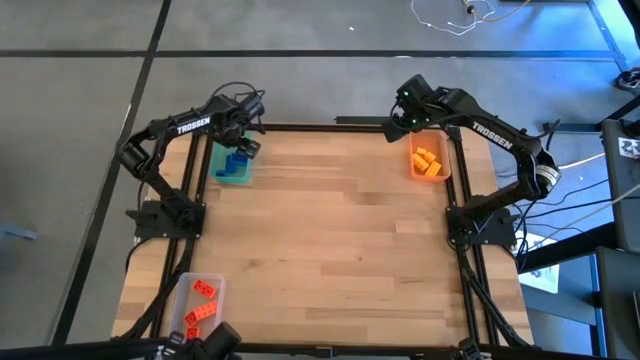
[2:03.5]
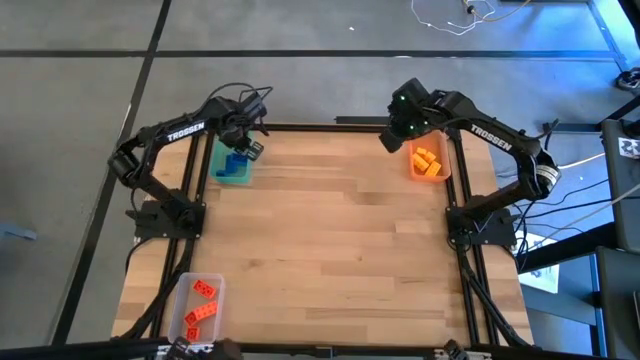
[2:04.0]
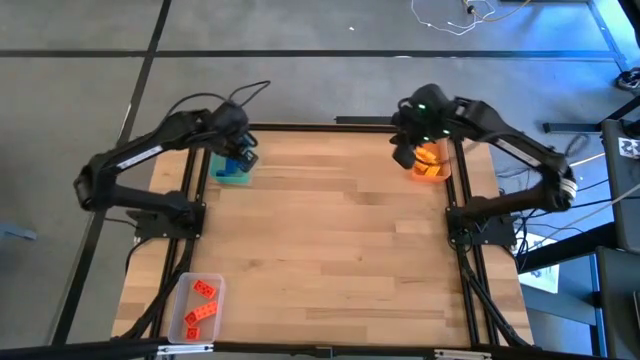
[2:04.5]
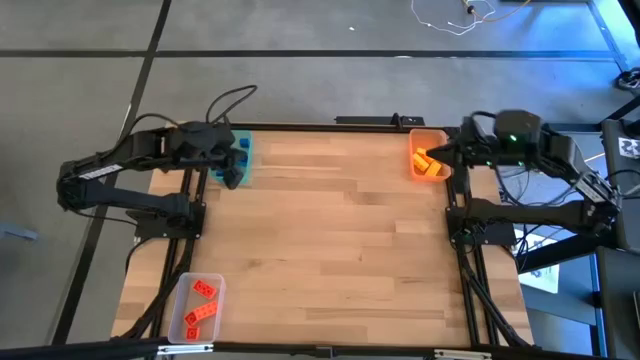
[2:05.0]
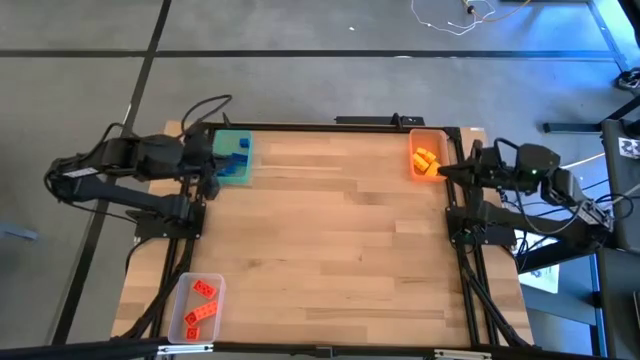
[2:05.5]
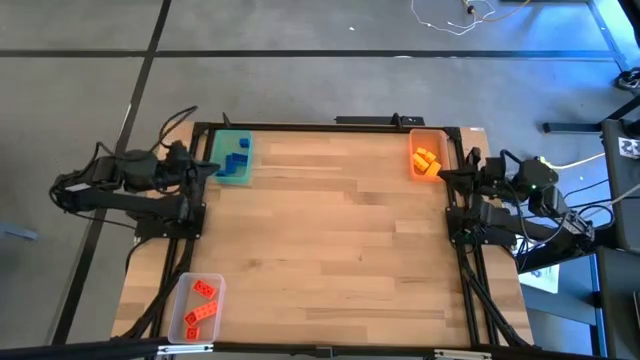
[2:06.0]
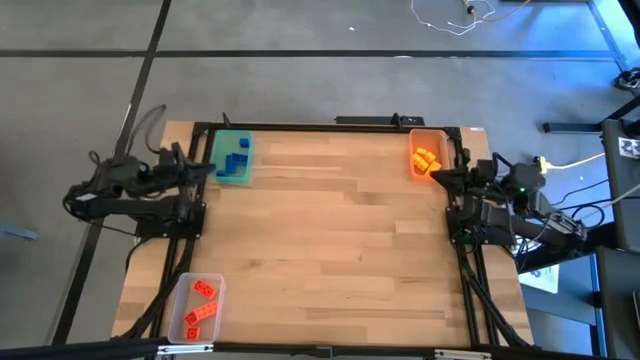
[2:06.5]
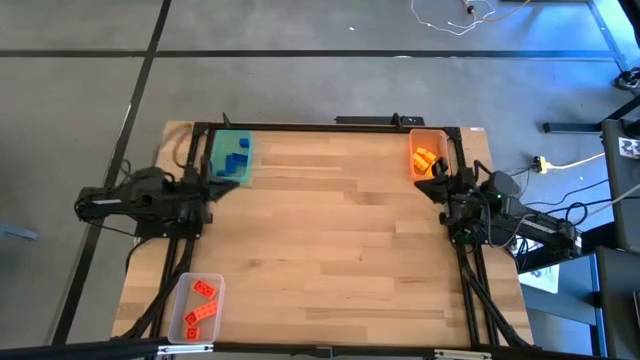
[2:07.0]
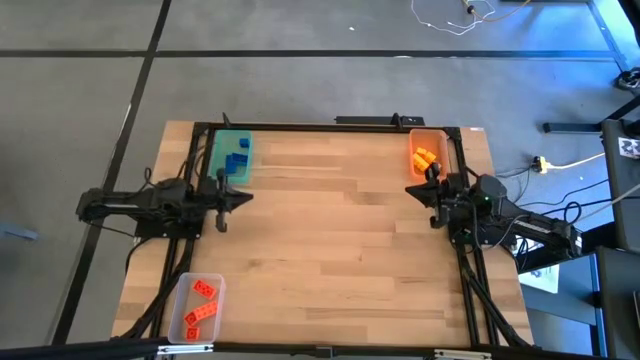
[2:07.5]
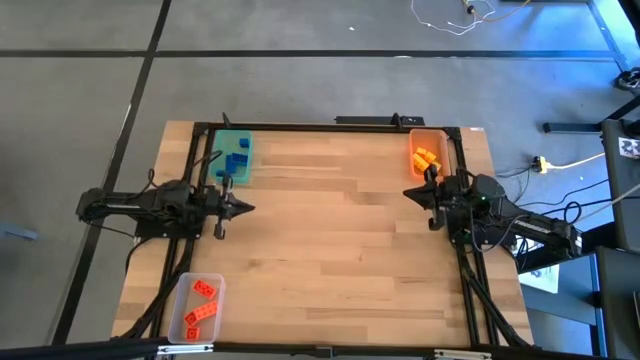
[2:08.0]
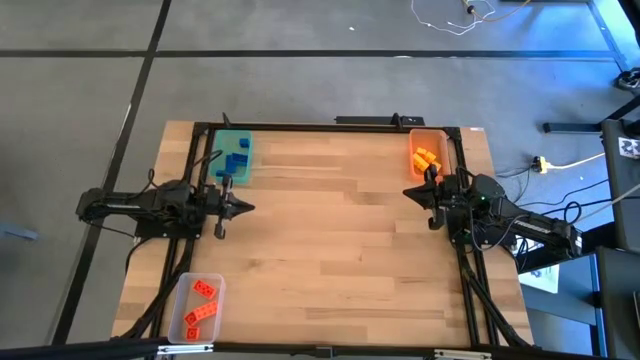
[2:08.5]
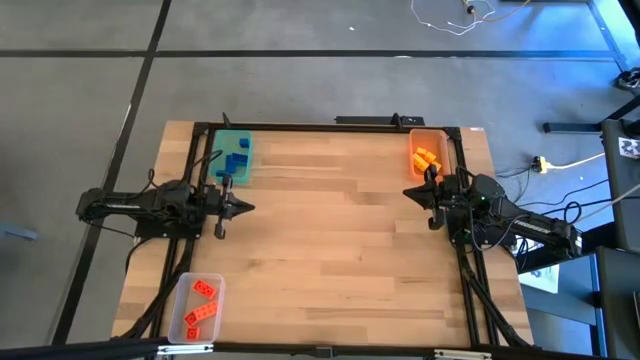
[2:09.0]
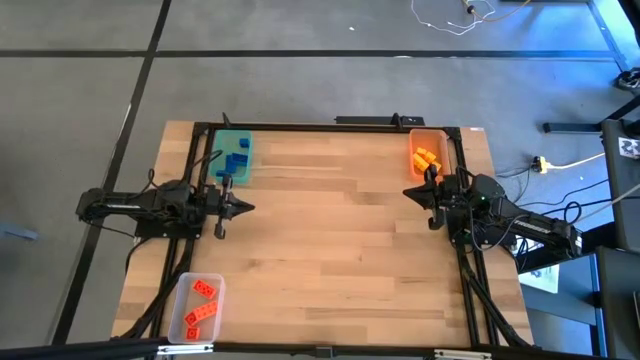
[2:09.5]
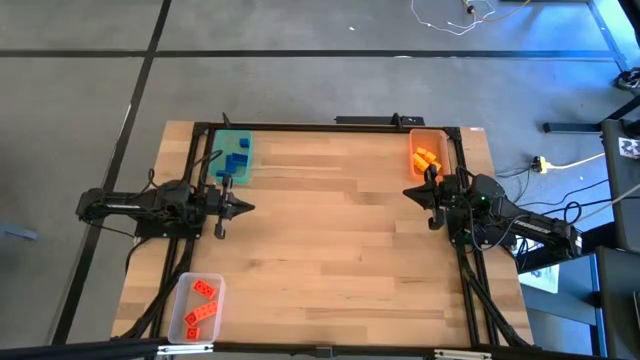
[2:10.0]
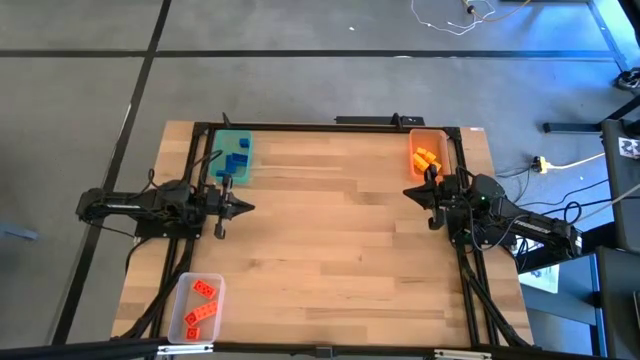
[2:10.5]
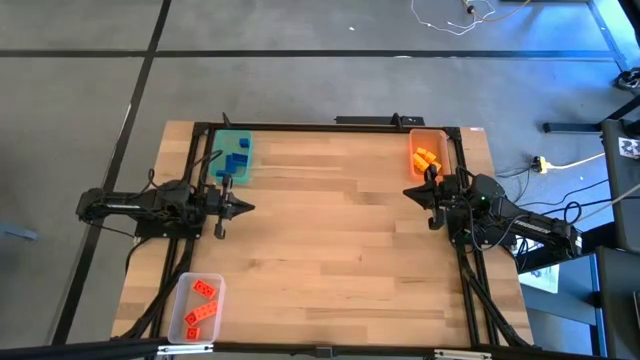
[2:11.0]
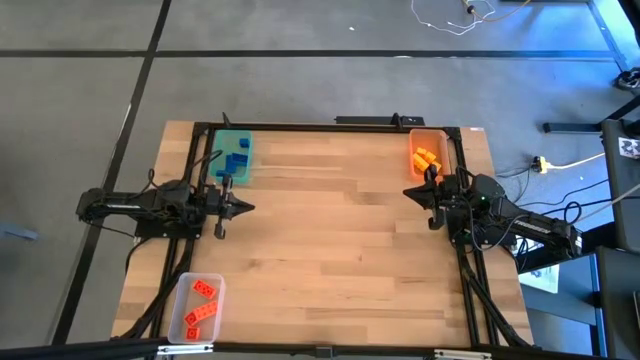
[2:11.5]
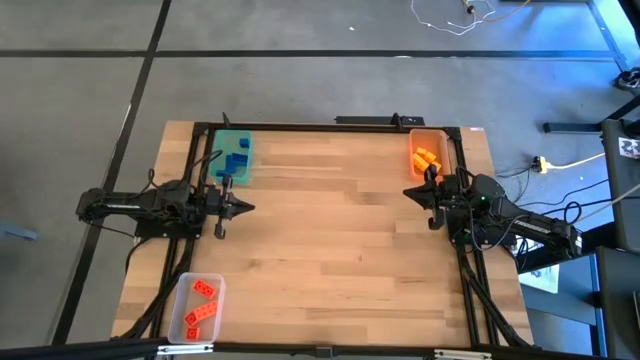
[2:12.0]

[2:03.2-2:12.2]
Task: Sort & place blocks by color
Return to Home Position

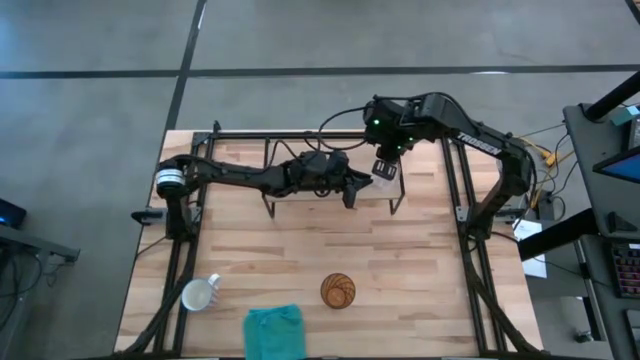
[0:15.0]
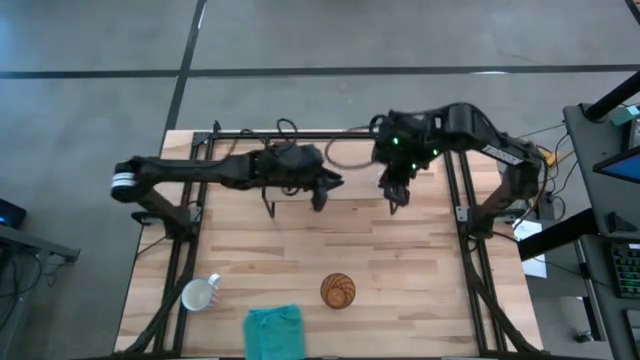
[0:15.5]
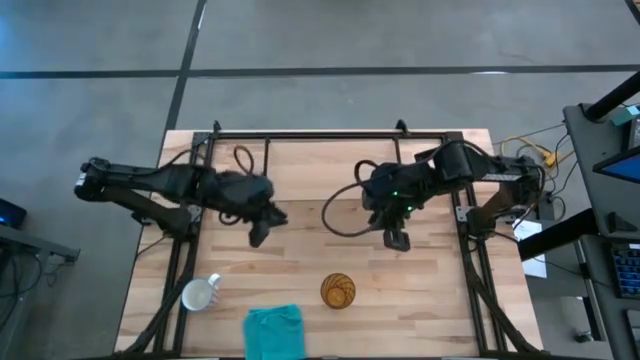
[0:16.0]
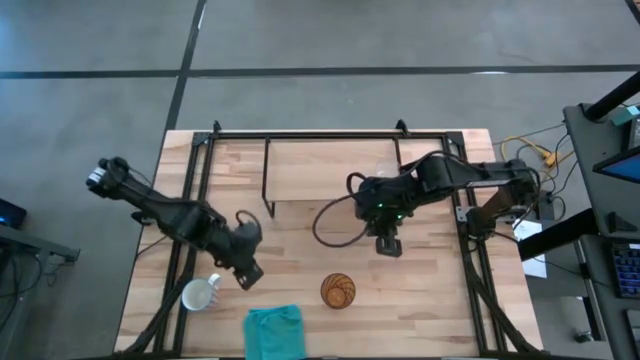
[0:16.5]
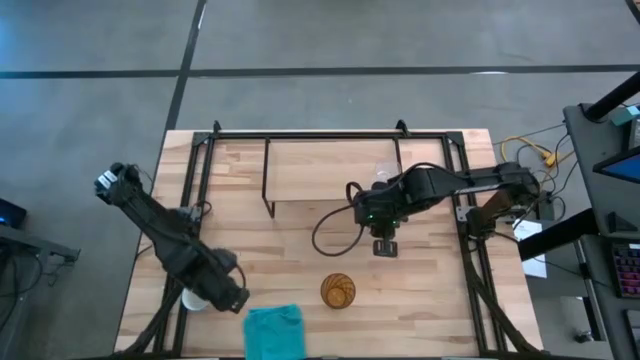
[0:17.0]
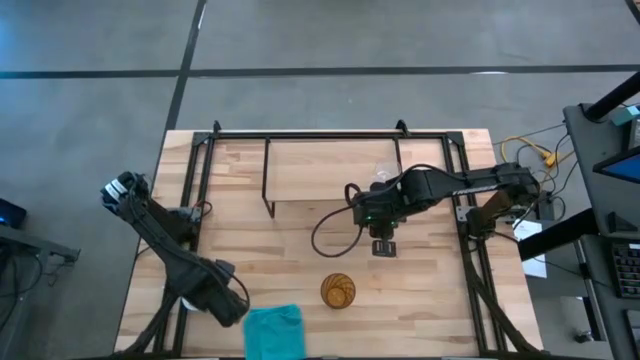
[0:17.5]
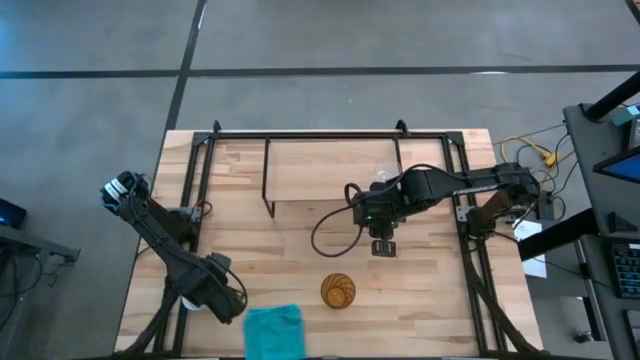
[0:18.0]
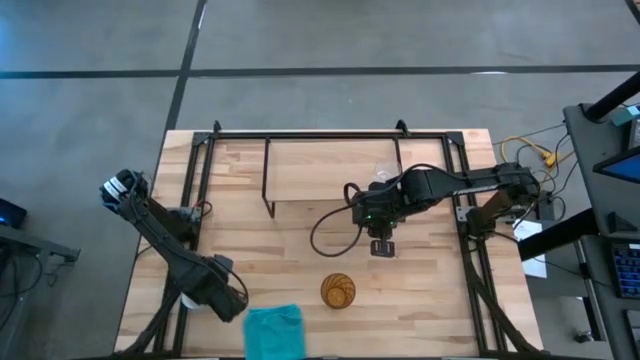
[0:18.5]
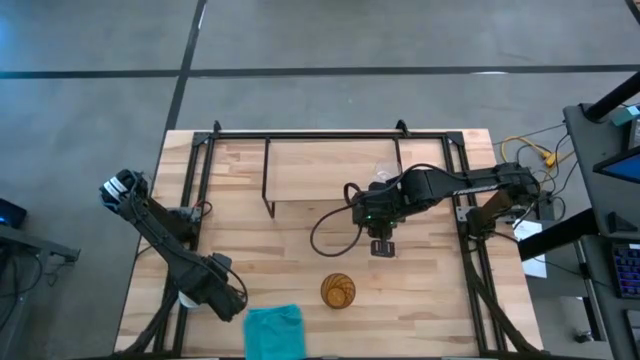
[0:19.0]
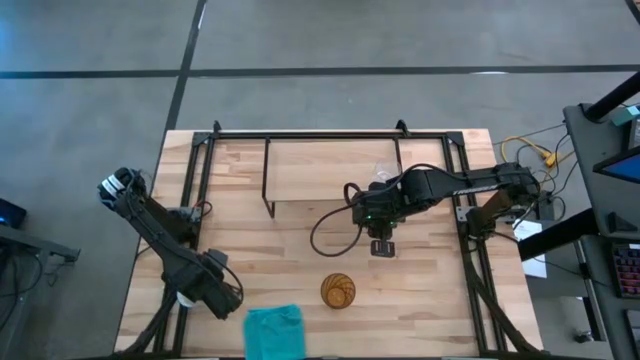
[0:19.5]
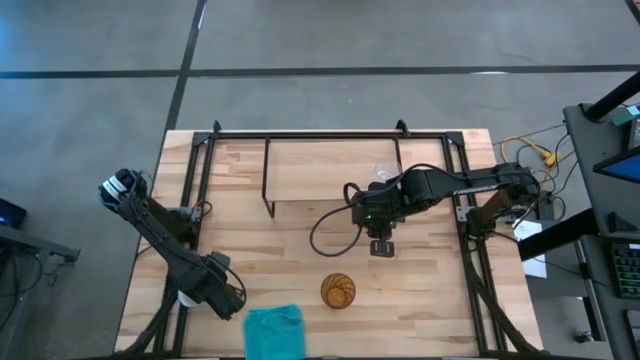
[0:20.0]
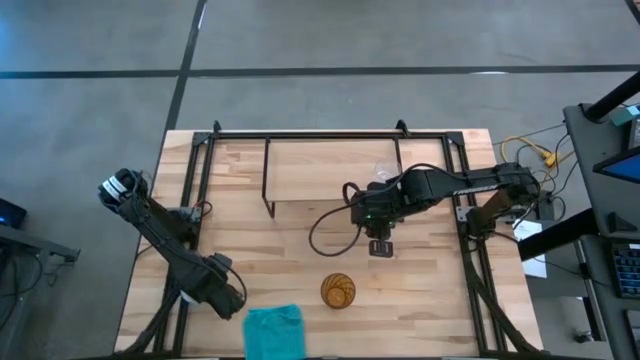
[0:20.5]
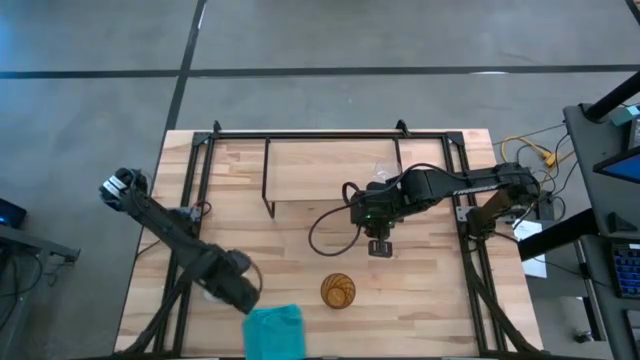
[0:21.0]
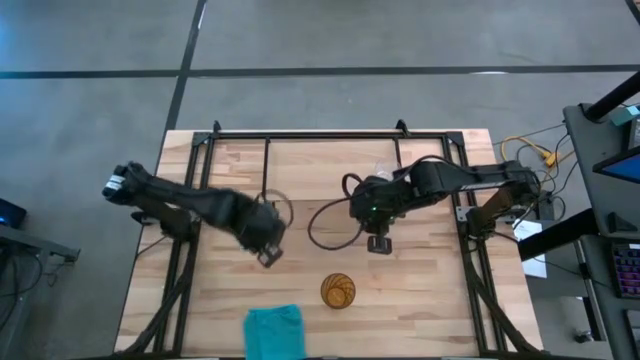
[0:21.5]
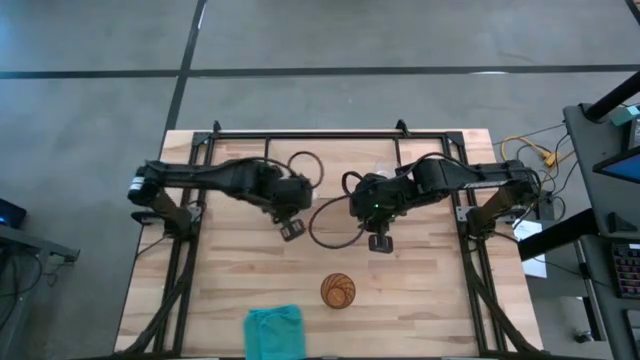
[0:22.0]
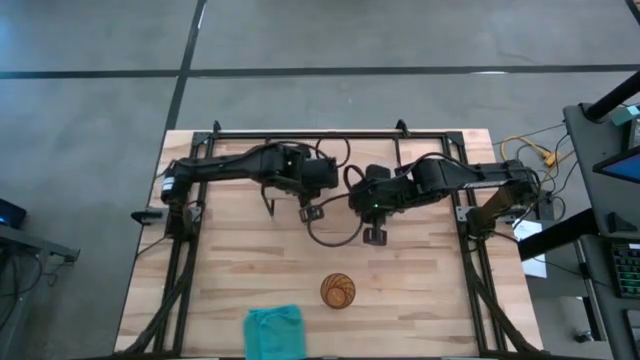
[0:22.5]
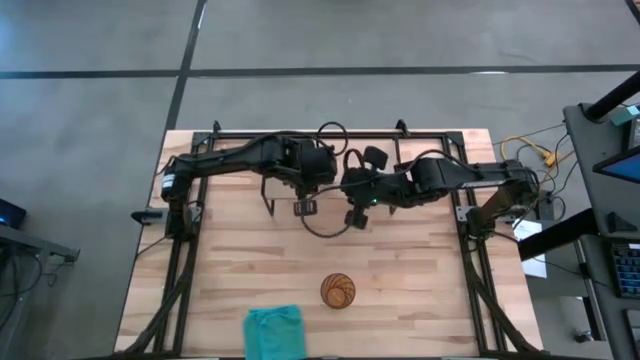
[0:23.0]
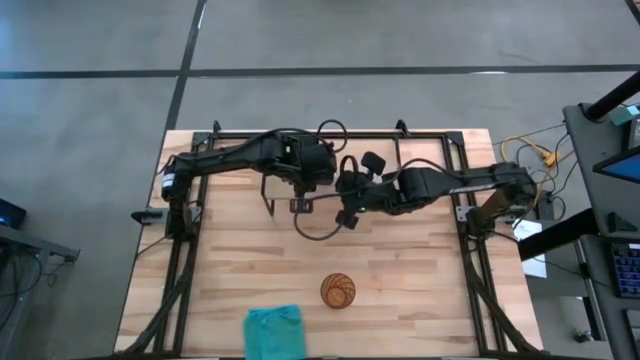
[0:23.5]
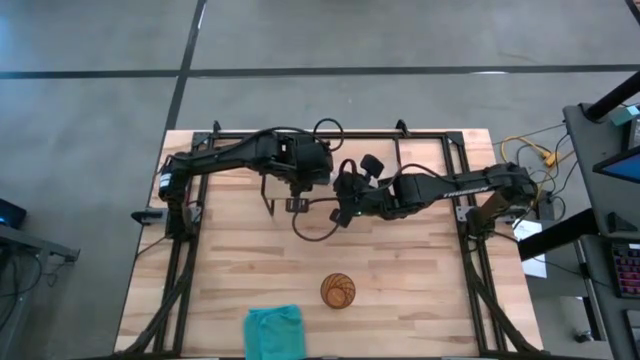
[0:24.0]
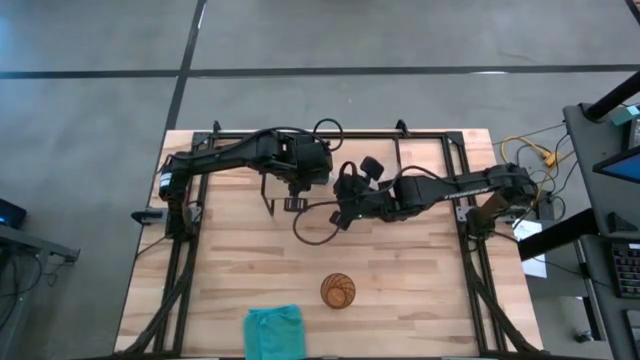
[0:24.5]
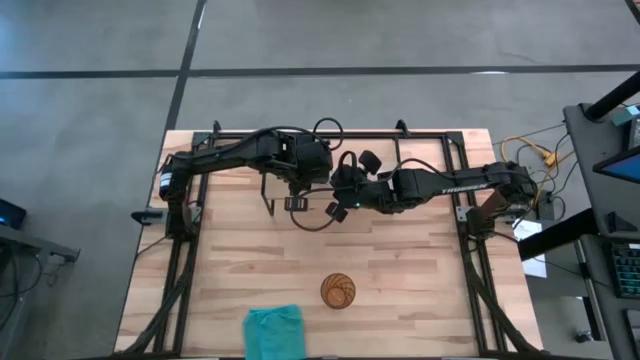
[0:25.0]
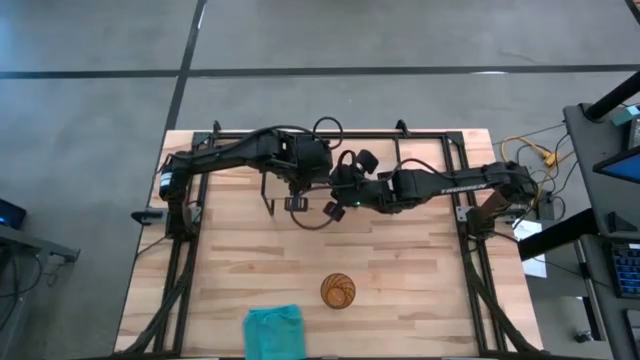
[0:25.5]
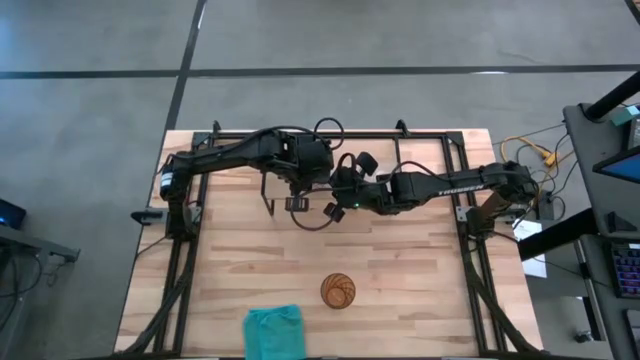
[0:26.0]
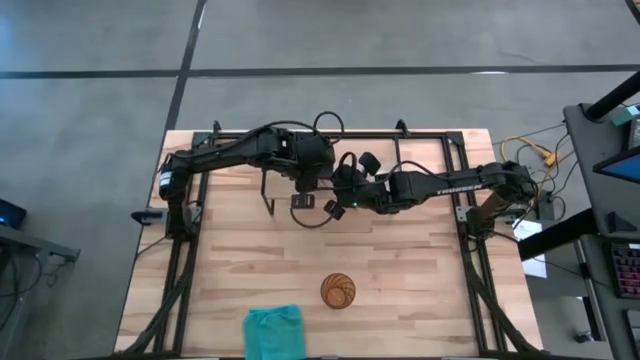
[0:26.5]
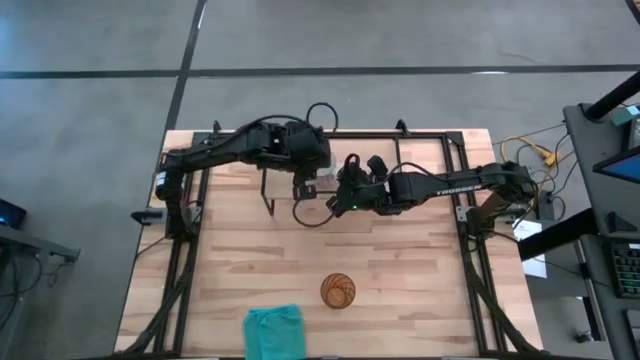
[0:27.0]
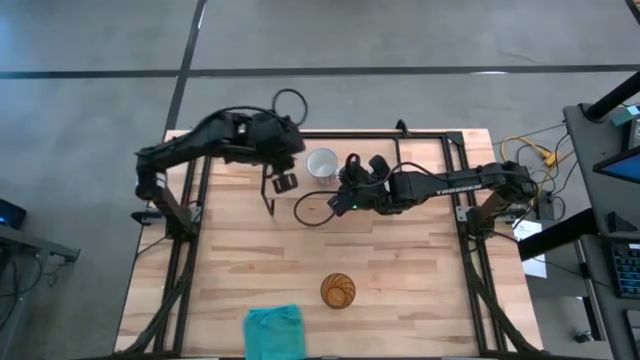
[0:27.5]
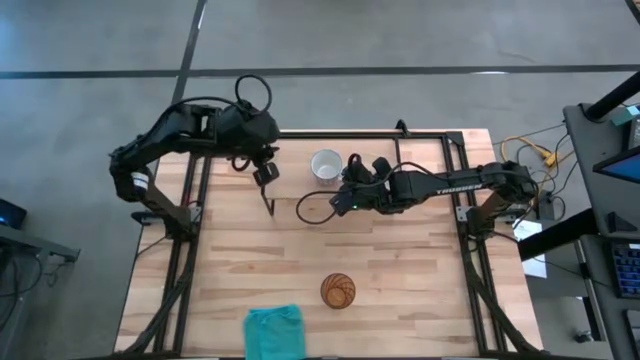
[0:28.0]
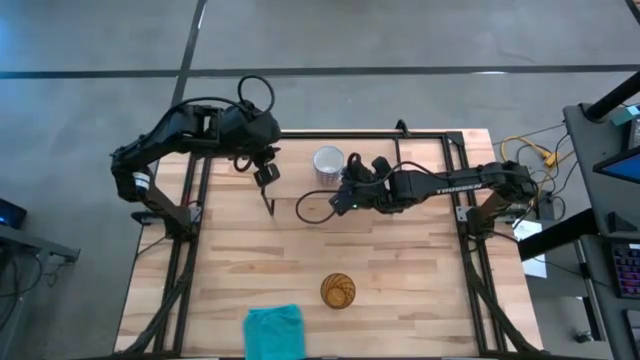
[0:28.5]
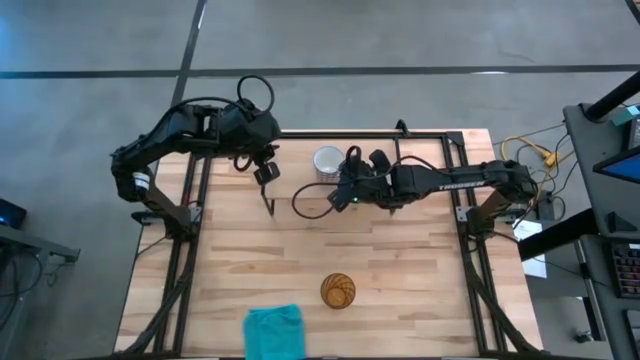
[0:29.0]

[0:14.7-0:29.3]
Task: Stack small to large cups/mugs on shelf
Put the white mug on the shelf
